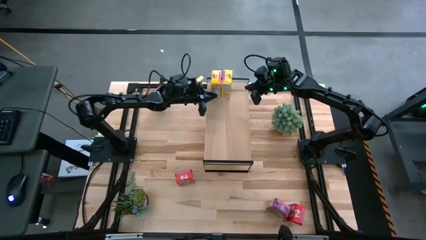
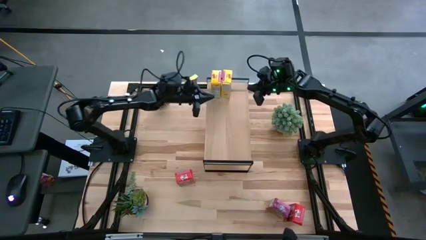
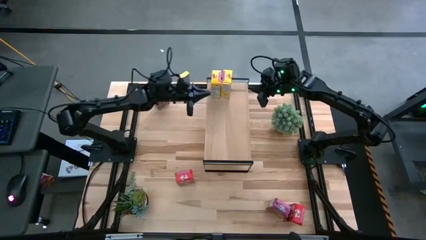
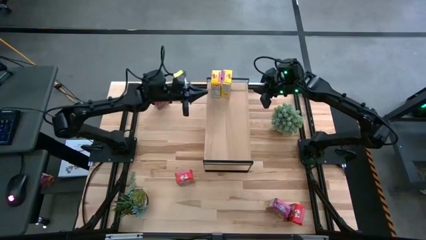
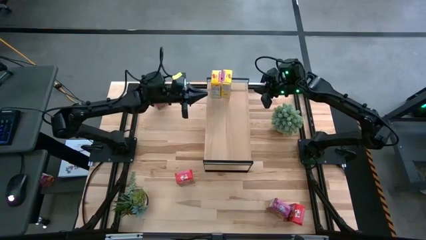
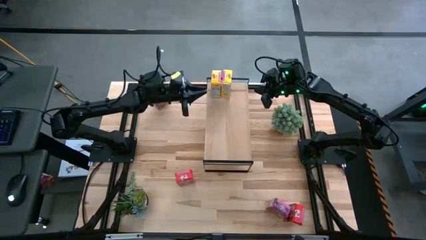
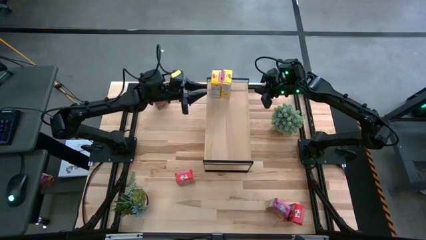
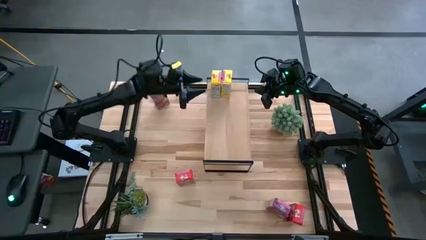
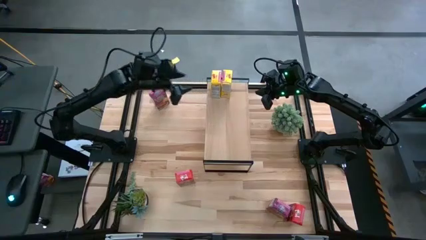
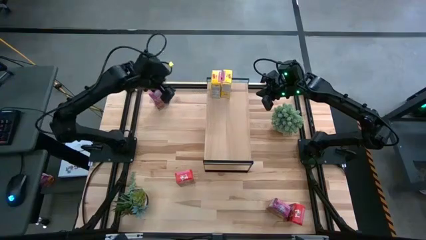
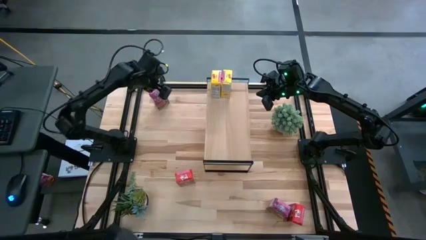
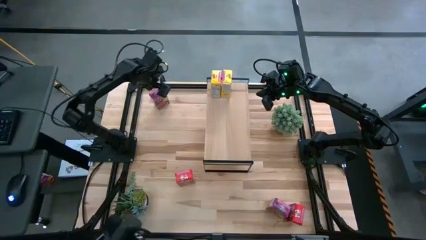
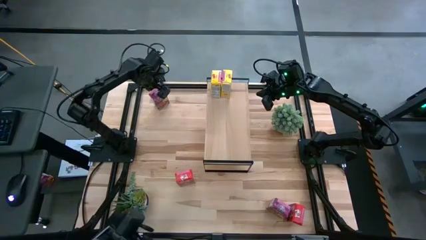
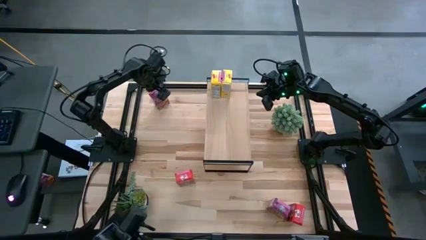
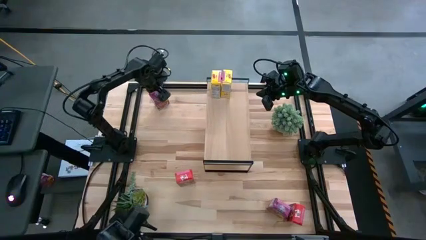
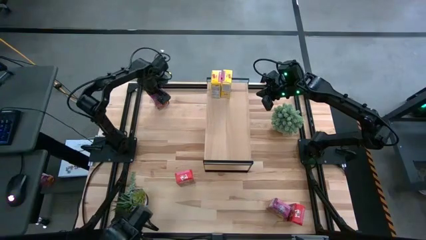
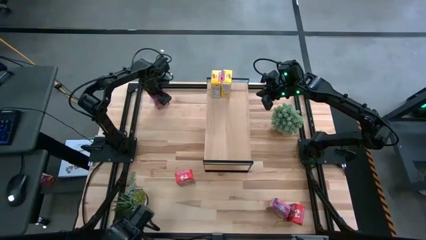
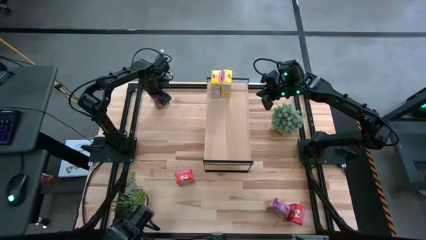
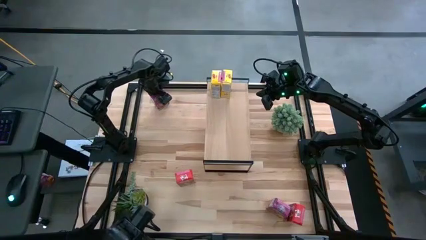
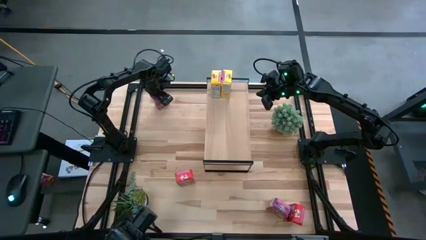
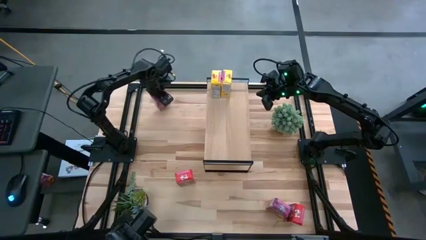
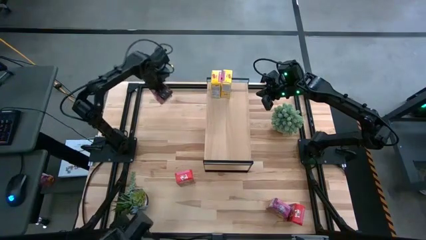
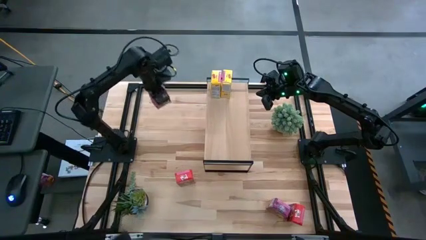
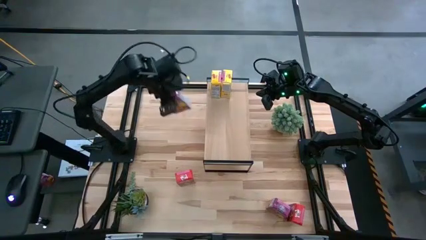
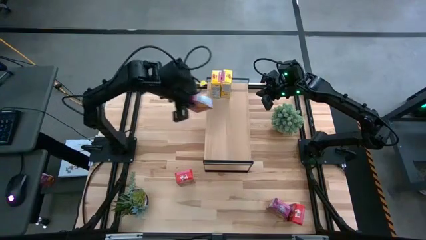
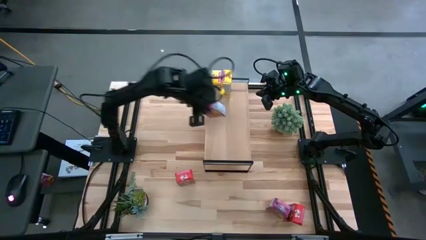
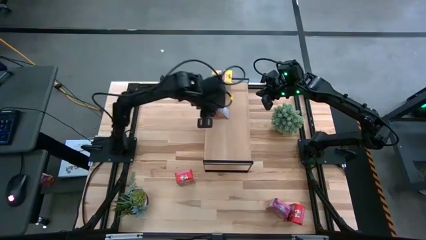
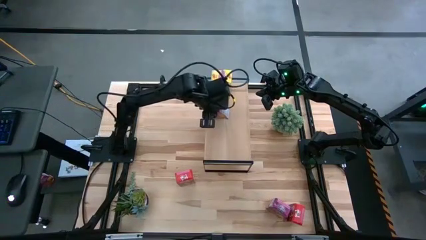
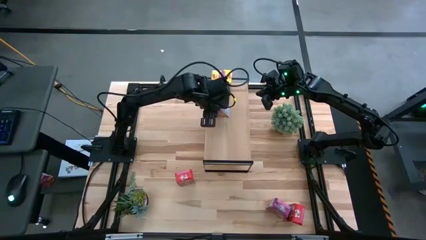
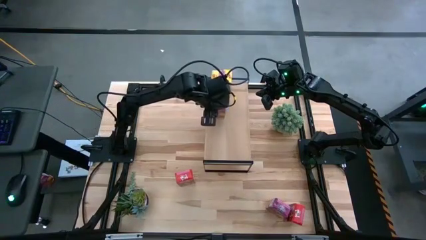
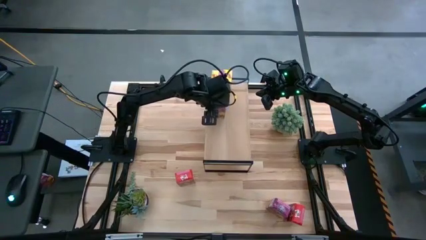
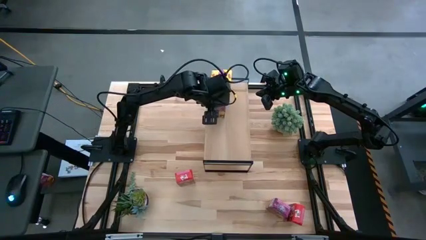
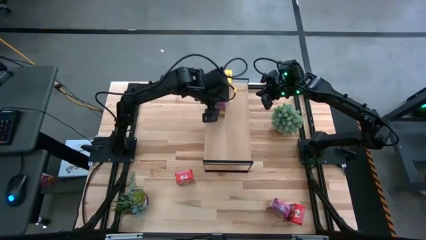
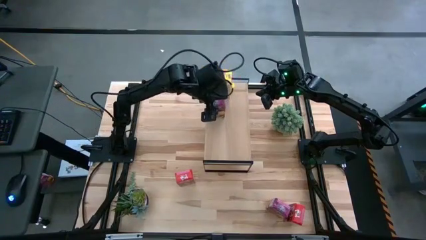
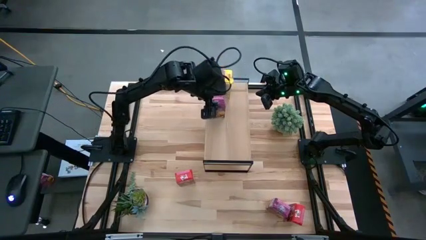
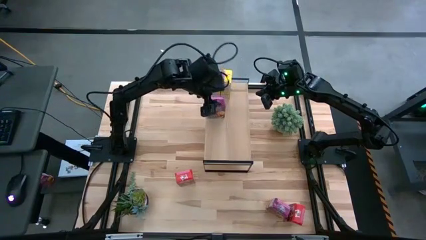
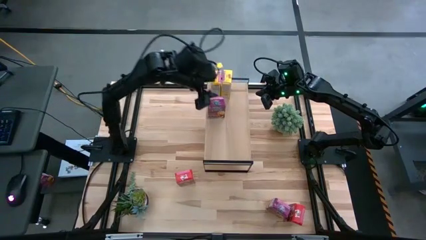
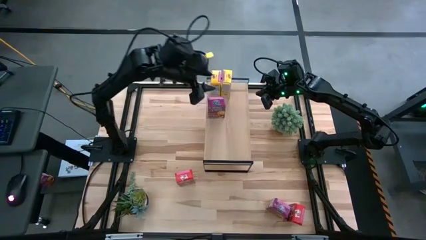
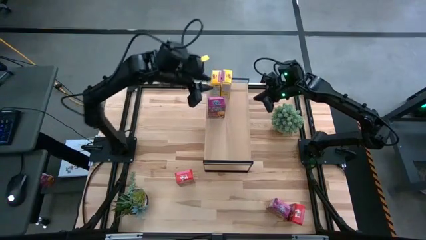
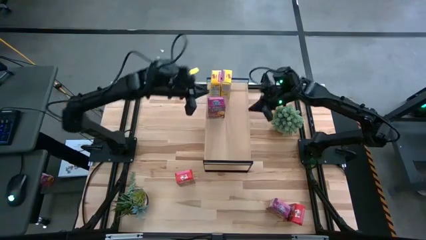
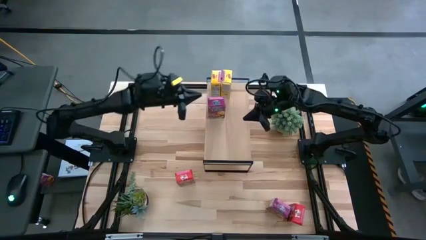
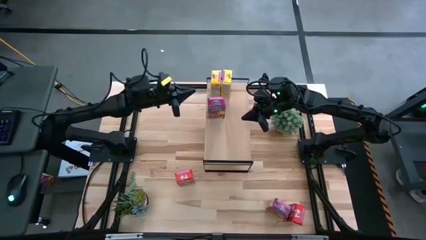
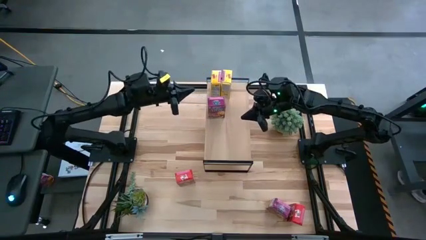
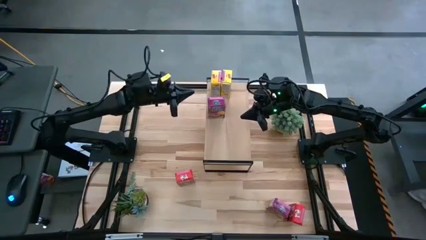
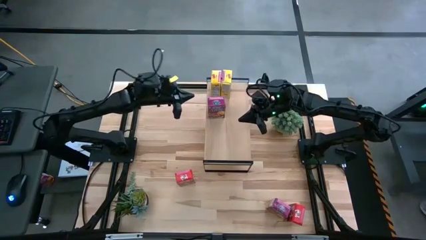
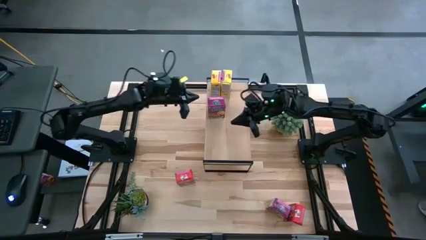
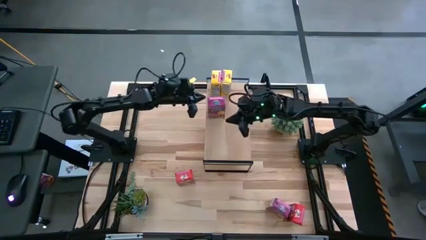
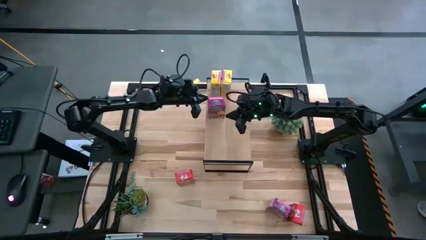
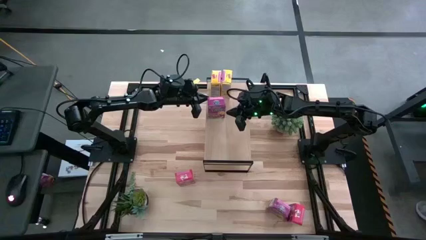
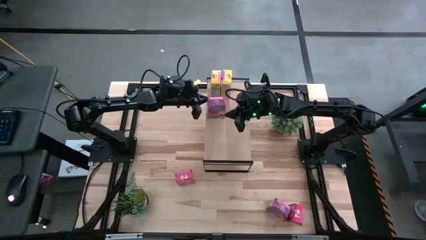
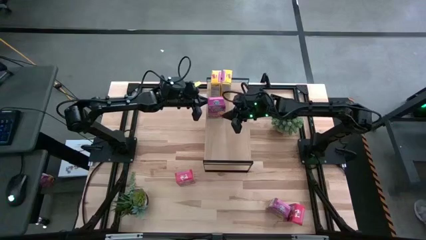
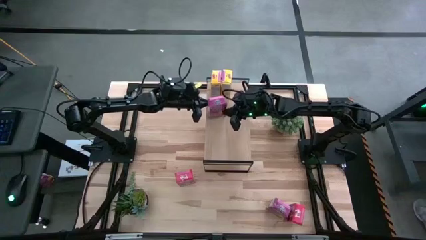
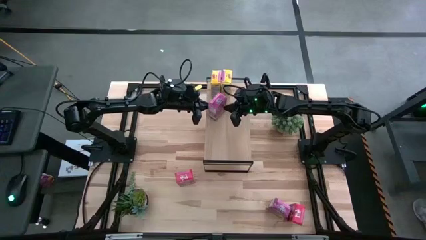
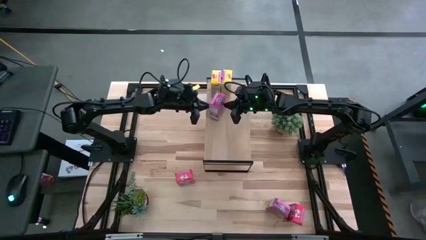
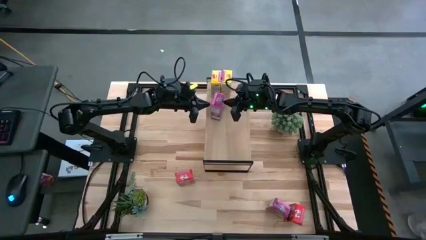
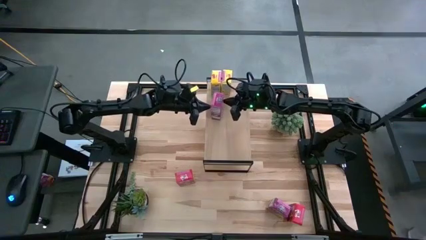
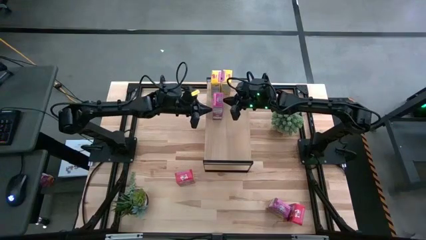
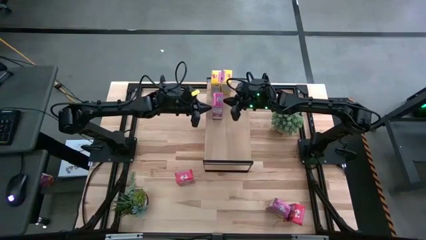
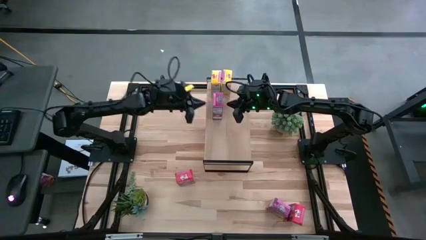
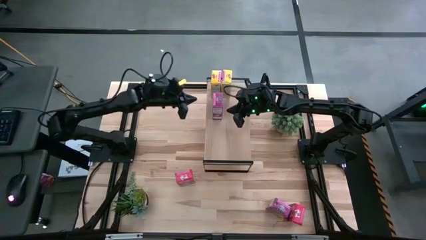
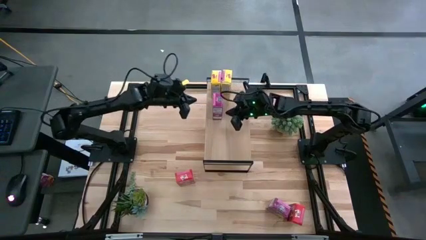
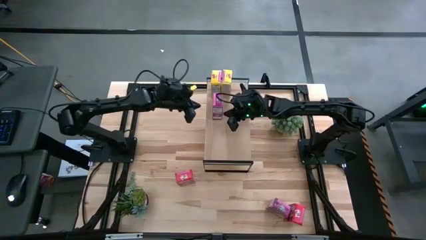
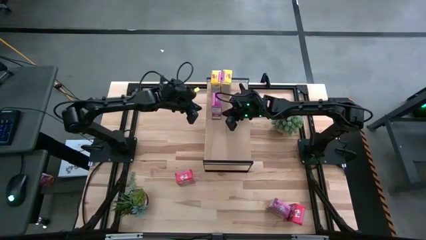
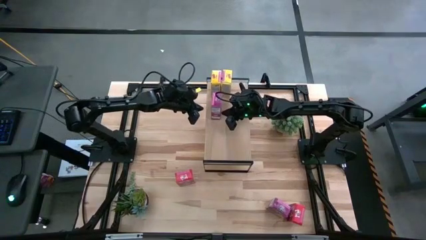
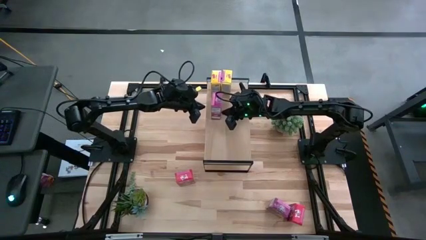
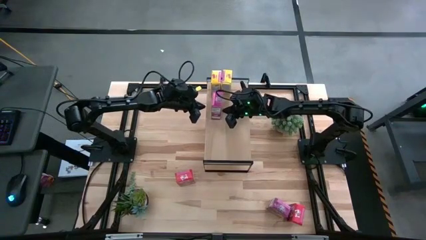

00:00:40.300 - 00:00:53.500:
Task: Stack cereal on shelf
Put the top violet cereal box on the shelf
